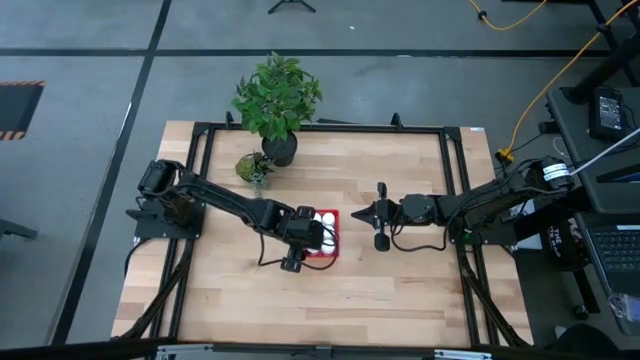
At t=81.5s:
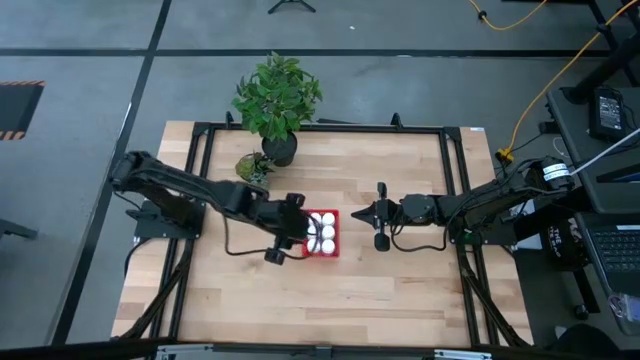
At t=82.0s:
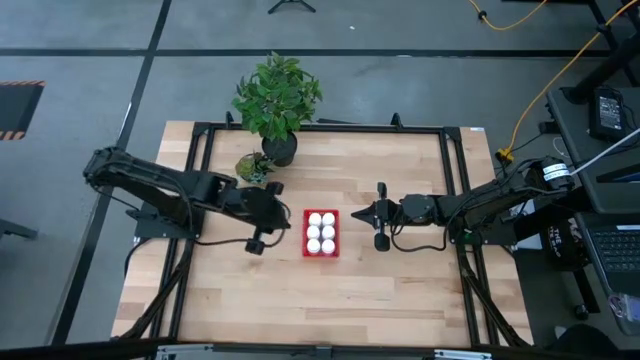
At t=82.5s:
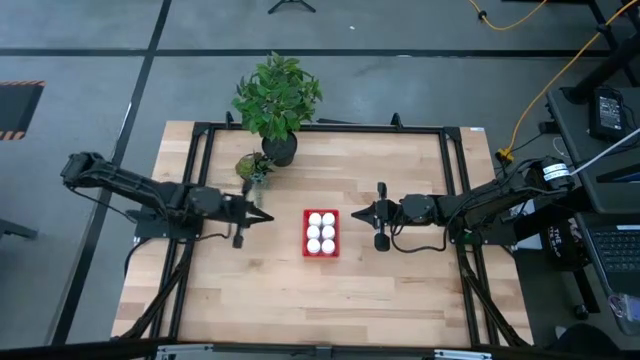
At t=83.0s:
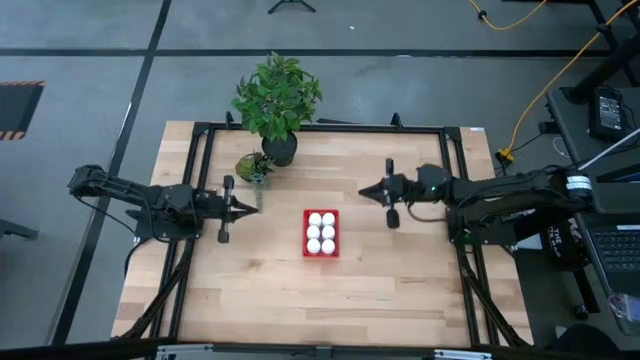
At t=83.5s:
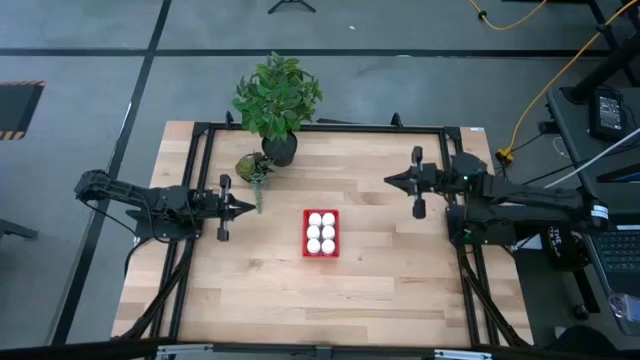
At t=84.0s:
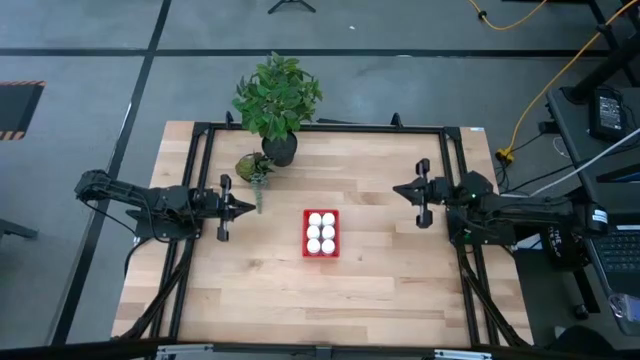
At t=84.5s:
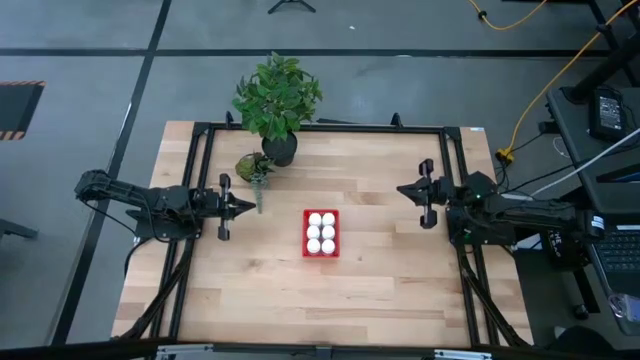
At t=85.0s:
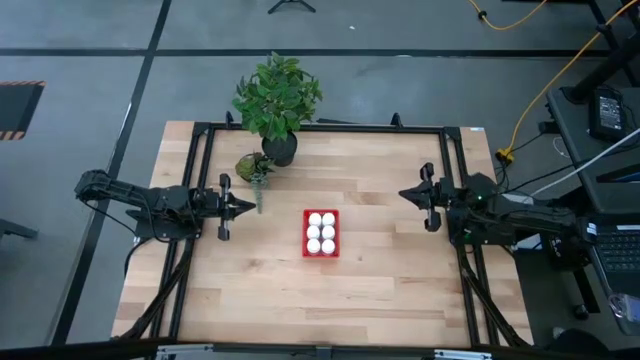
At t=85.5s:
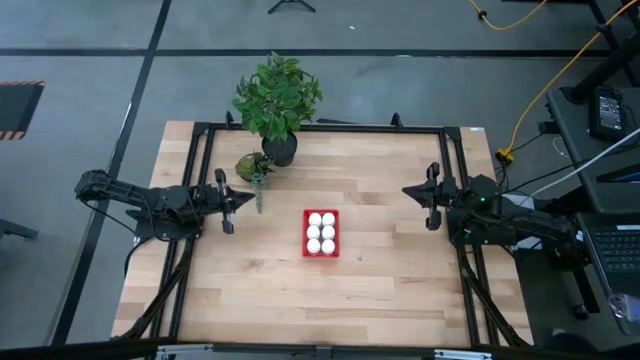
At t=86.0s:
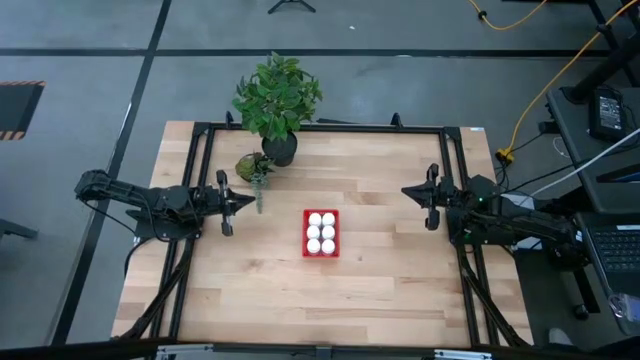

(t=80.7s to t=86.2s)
Task: Pick and place pill bottles into a basket
Return to Home Position

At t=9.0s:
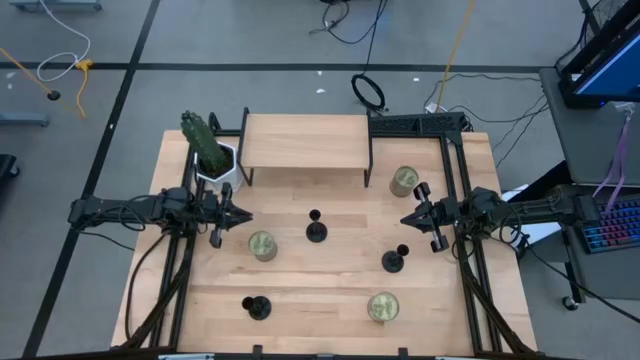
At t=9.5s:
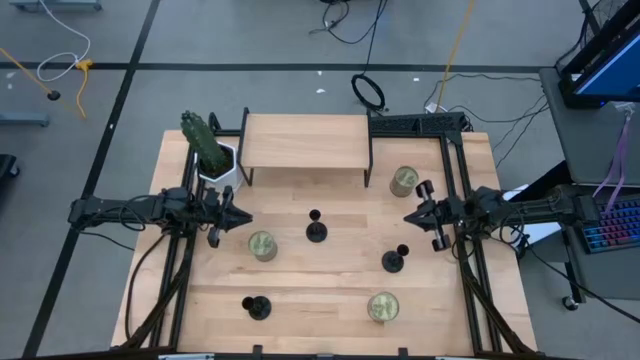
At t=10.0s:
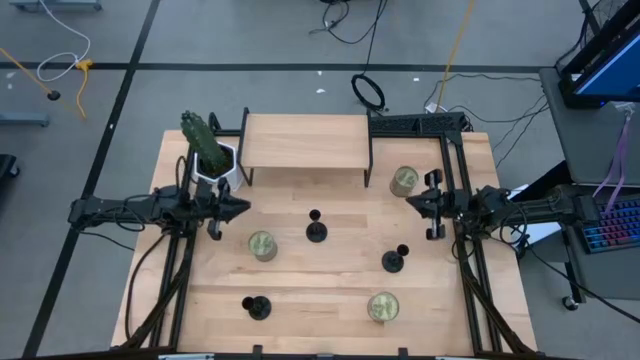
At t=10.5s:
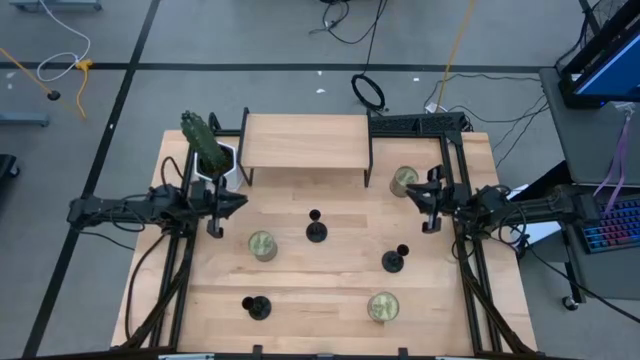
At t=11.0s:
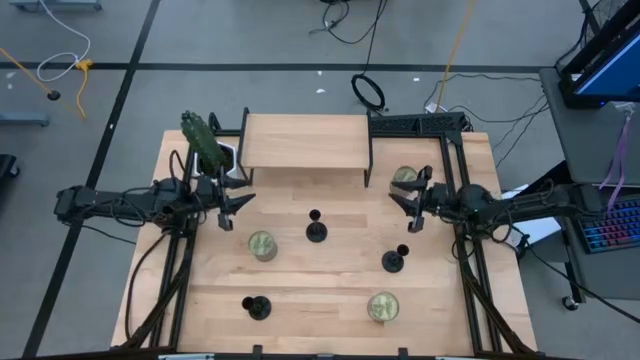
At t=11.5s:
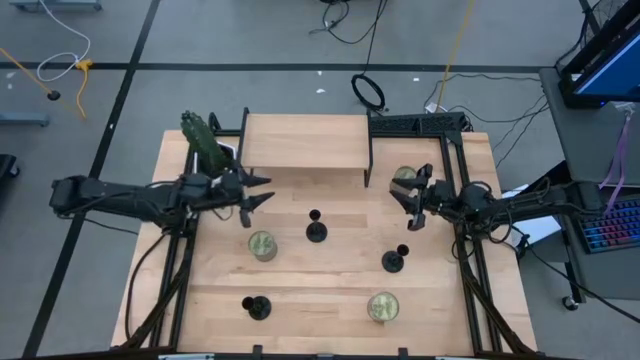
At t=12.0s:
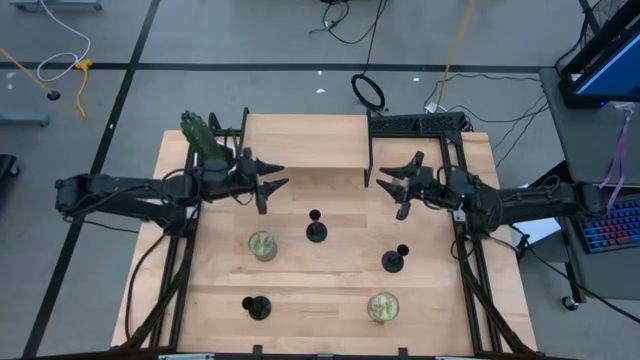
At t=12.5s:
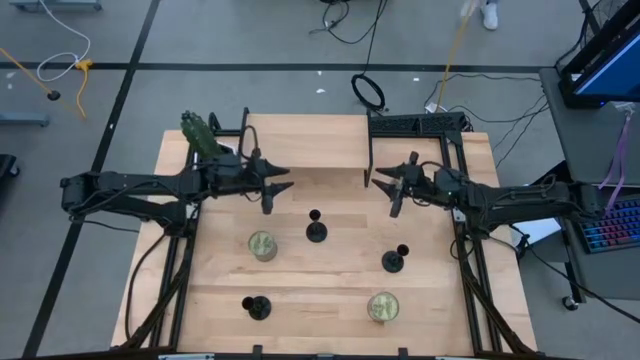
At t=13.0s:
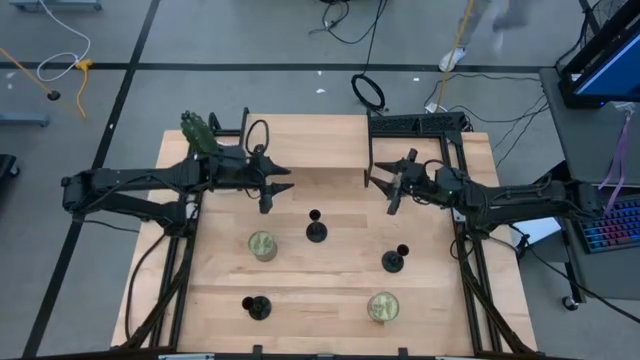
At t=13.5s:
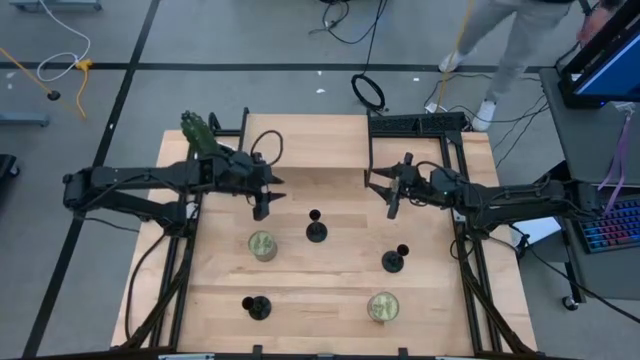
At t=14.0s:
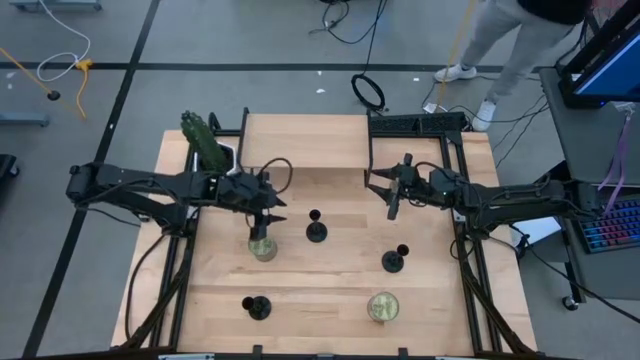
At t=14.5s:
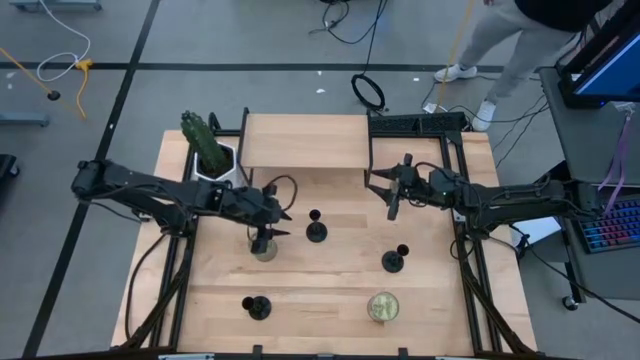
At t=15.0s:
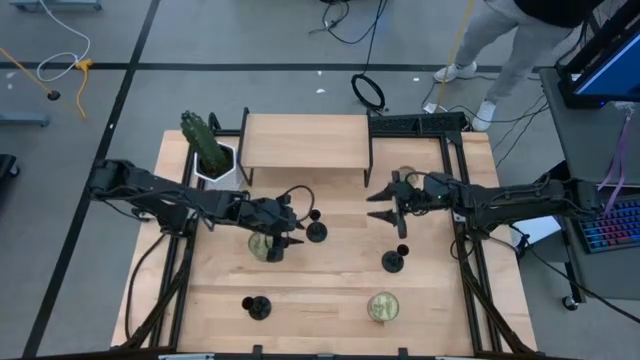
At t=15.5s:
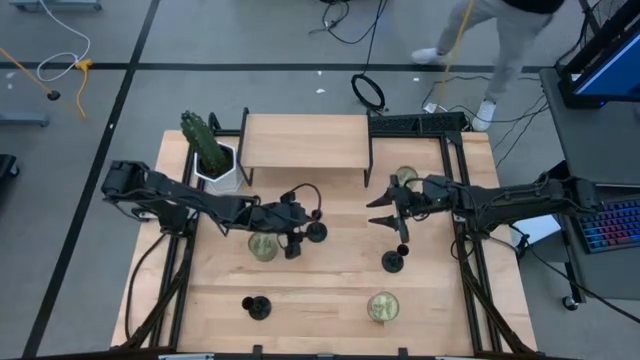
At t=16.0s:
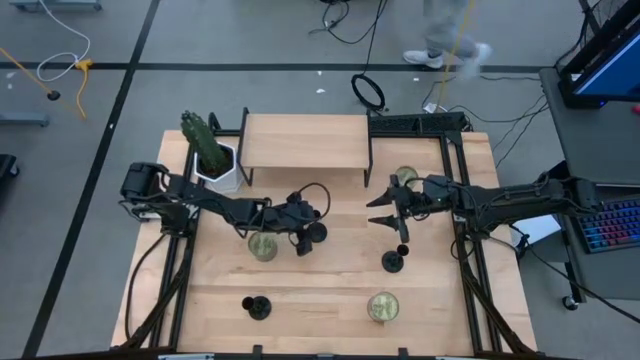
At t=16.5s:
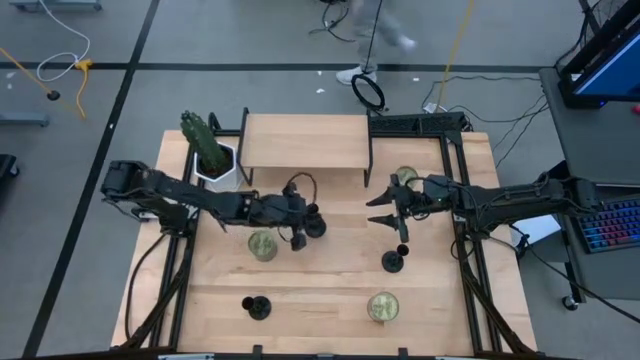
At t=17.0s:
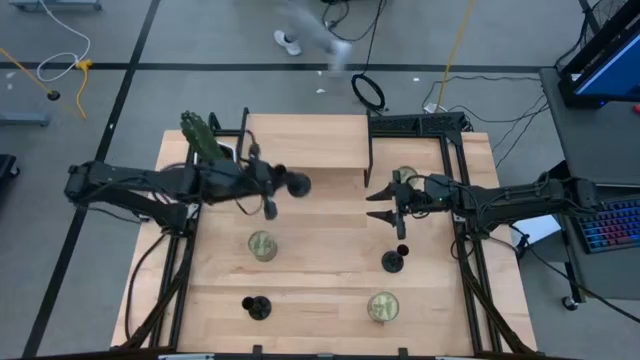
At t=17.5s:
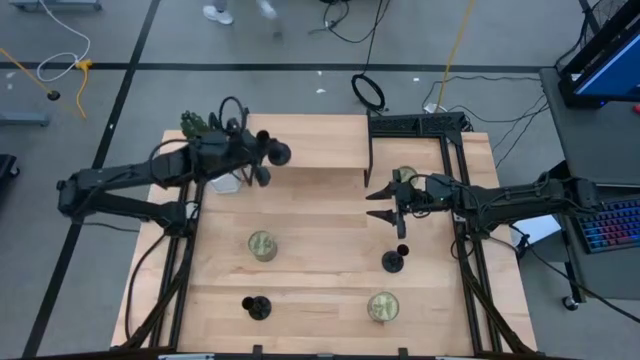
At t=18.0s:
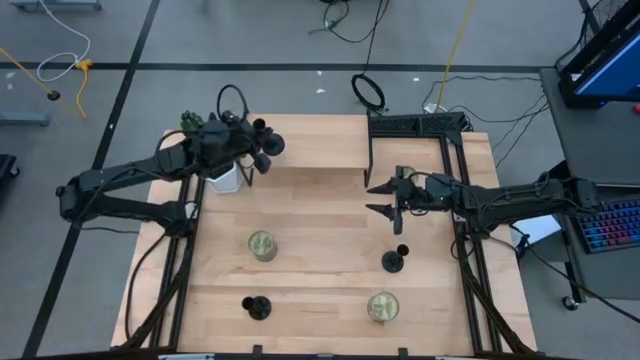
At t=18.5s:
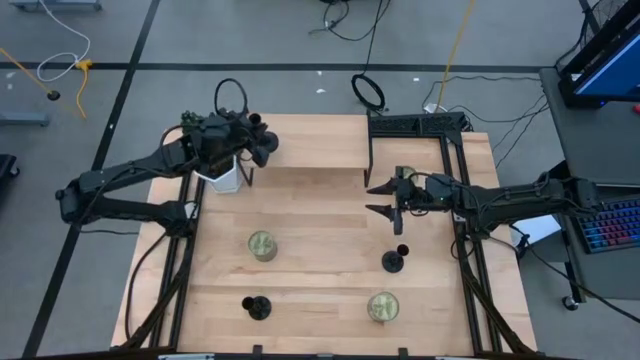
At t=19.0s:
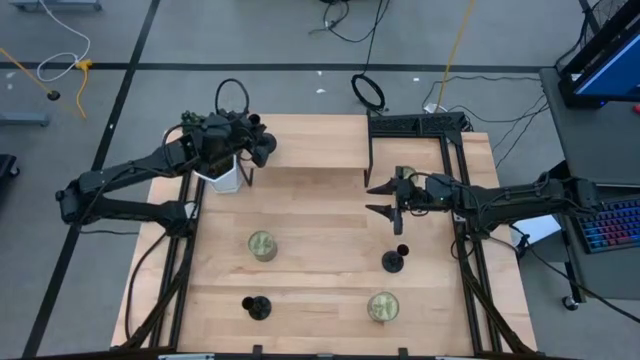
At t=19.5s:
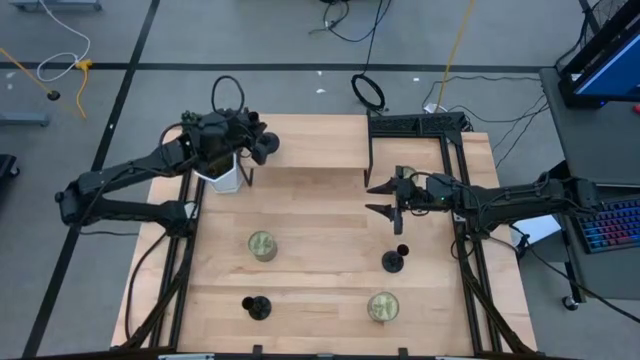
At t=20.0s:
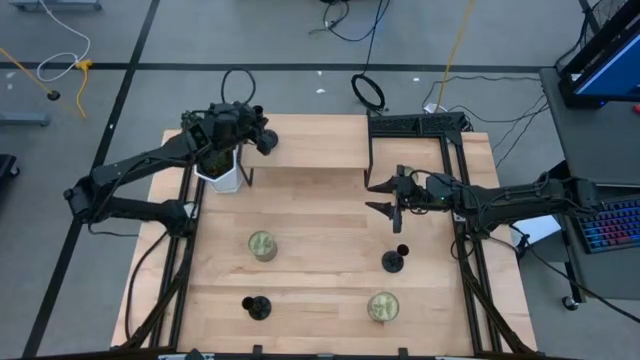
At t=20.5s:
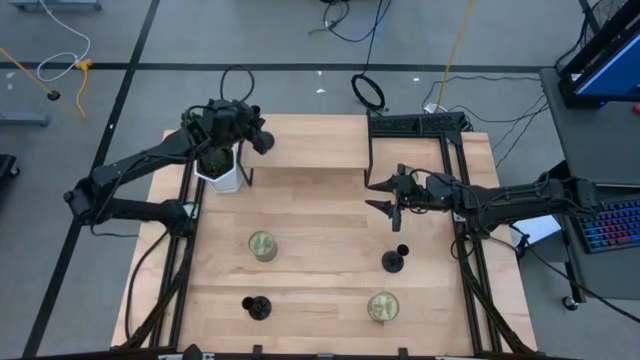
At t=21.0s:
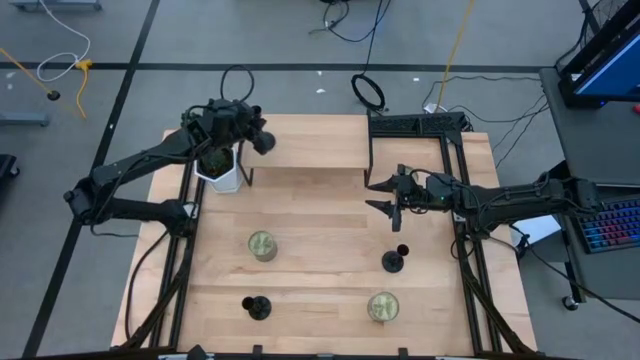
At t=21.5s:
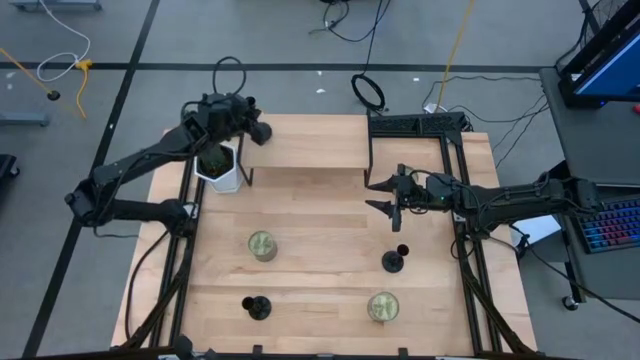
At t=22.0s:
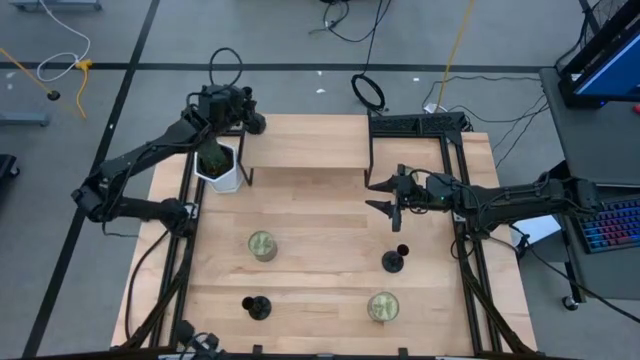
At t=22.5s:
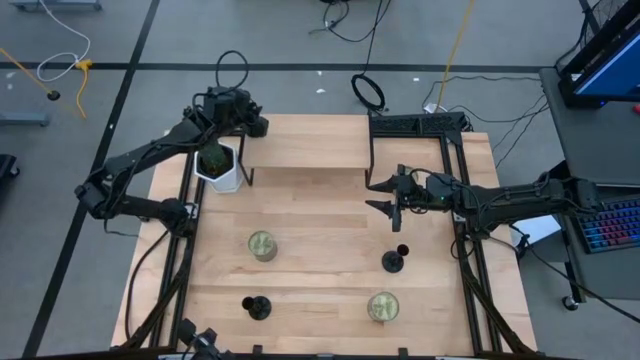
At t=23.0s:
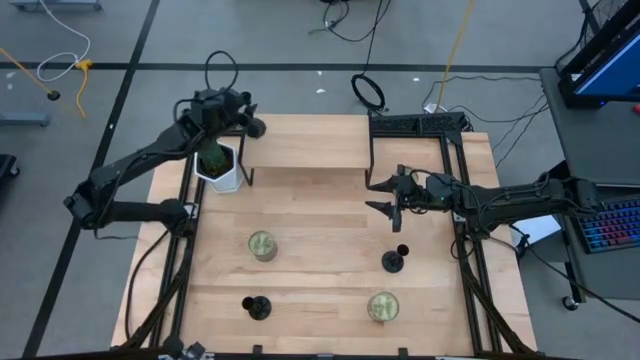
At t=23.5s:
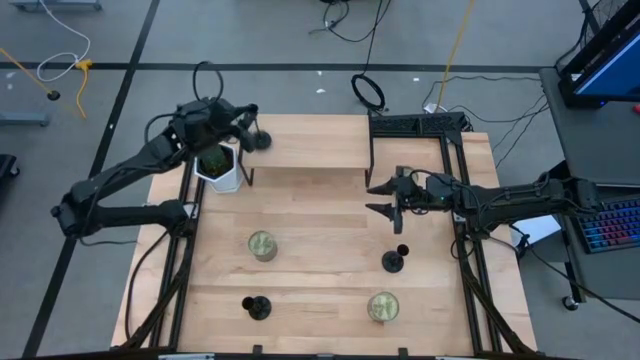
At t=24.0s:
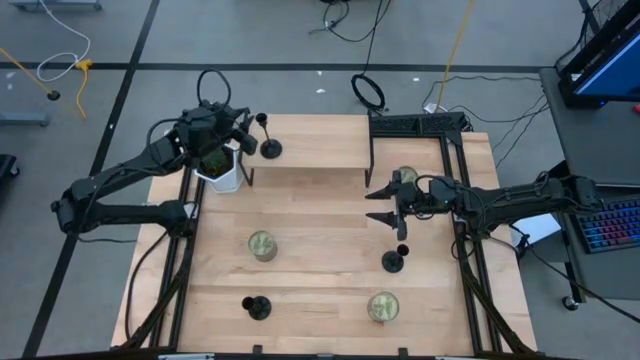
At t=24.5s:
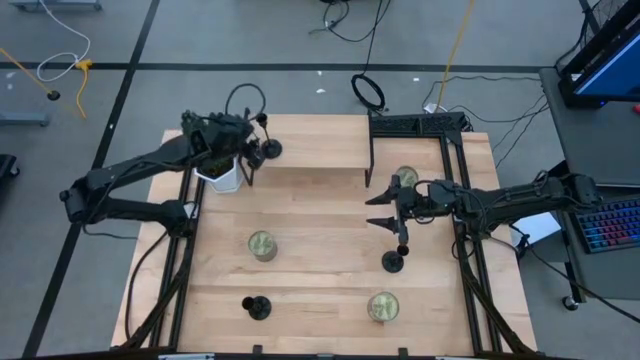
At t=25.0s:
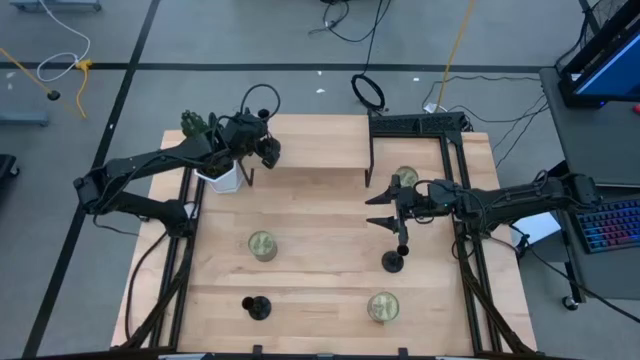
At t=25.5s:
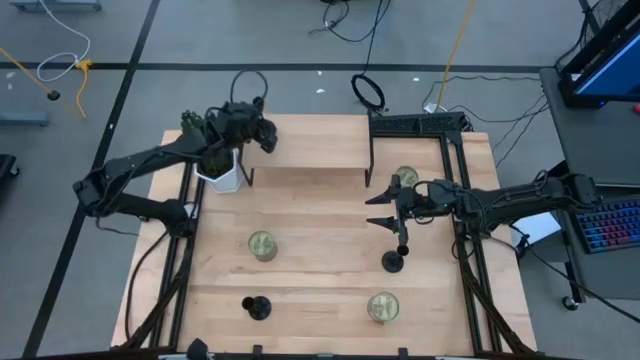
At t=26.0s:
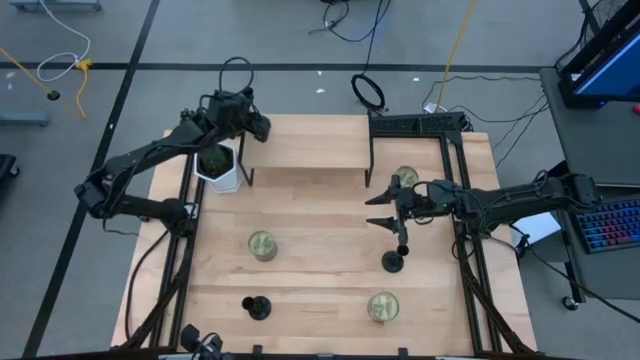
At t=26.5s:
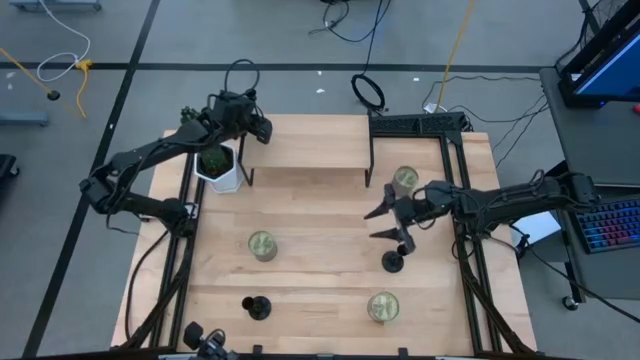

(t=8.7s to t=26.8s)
Task: Pick & Place candle stick holders
Put the top black candle holder on the shelf
